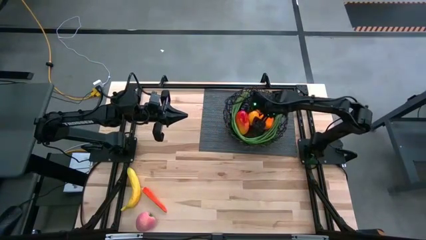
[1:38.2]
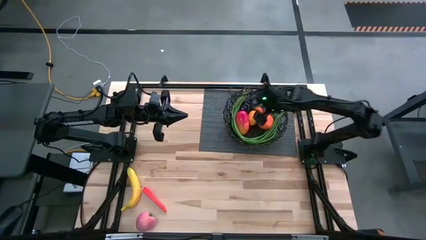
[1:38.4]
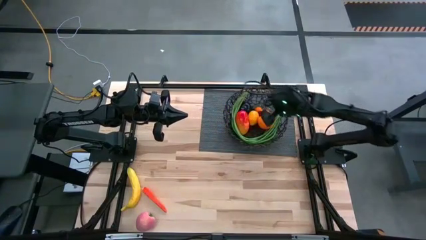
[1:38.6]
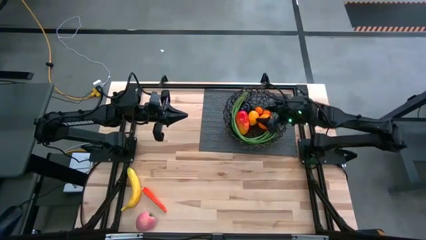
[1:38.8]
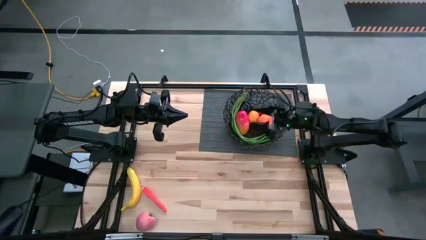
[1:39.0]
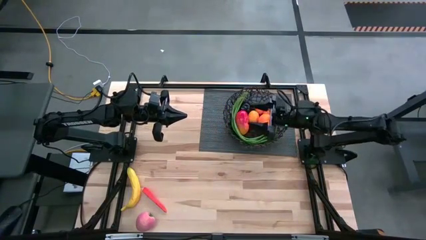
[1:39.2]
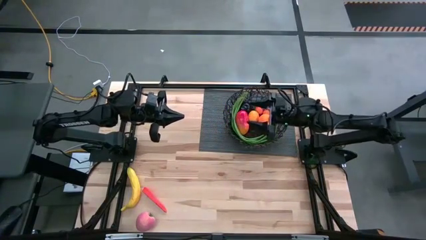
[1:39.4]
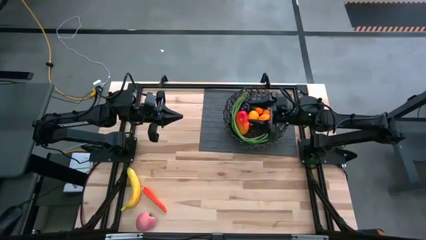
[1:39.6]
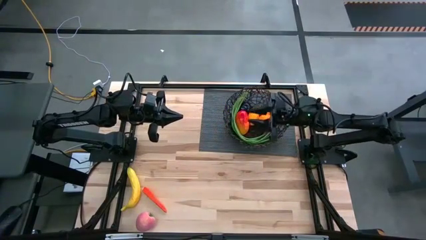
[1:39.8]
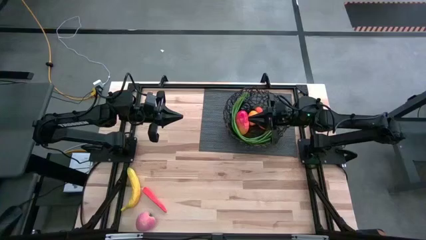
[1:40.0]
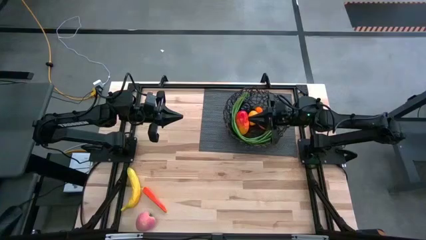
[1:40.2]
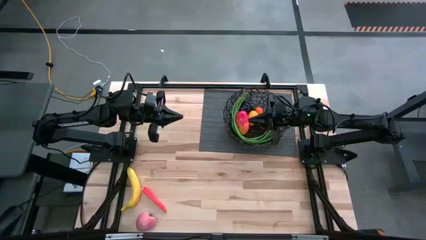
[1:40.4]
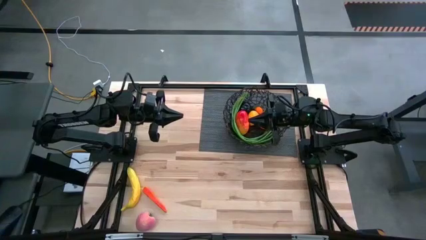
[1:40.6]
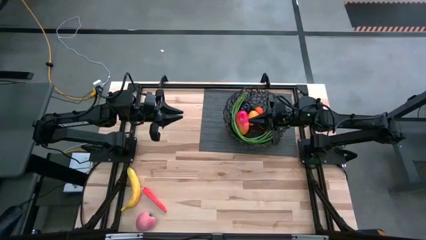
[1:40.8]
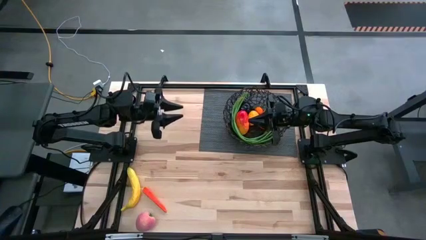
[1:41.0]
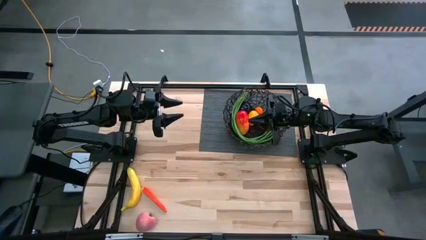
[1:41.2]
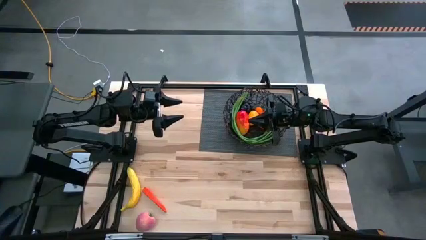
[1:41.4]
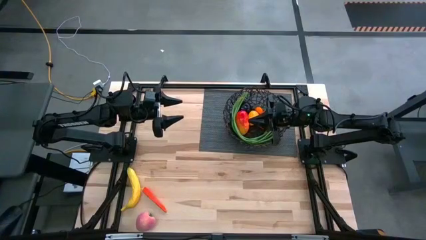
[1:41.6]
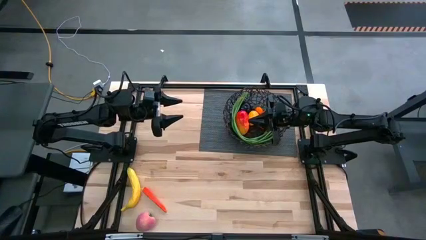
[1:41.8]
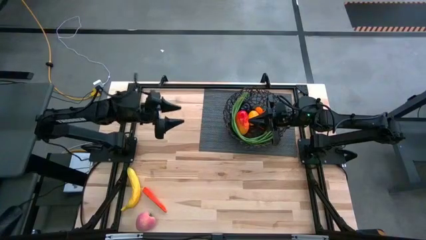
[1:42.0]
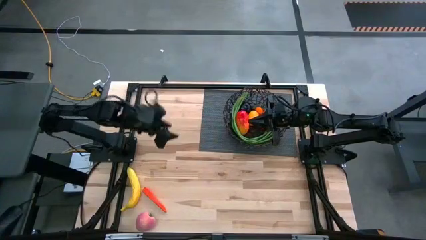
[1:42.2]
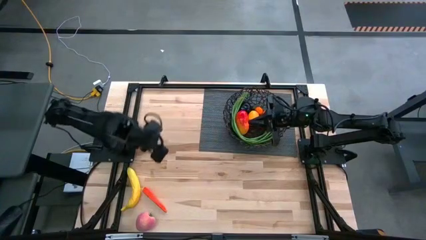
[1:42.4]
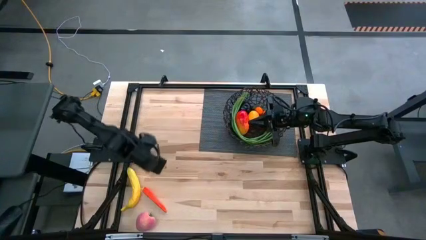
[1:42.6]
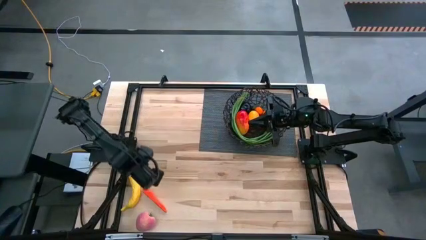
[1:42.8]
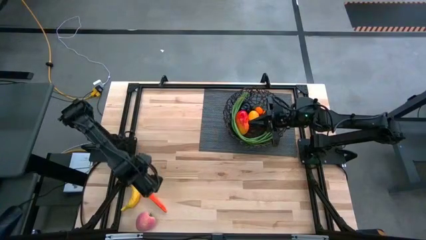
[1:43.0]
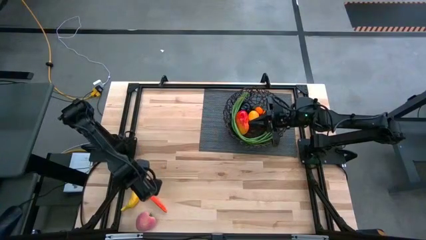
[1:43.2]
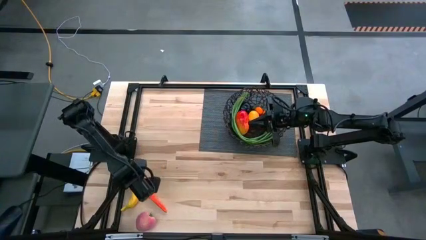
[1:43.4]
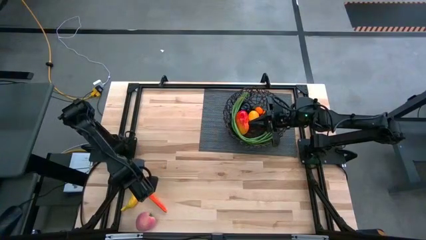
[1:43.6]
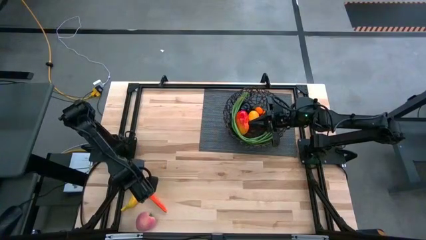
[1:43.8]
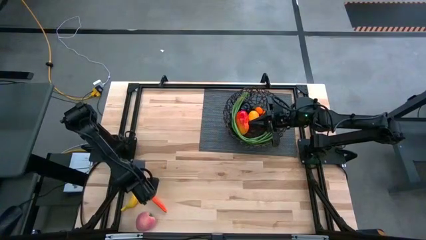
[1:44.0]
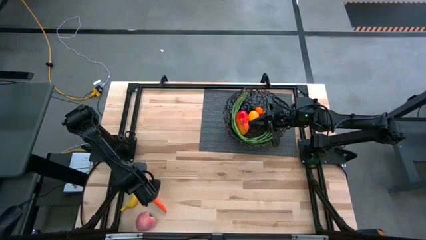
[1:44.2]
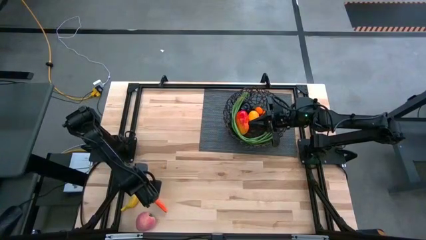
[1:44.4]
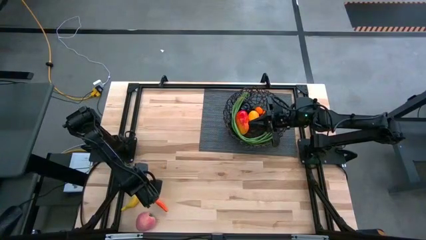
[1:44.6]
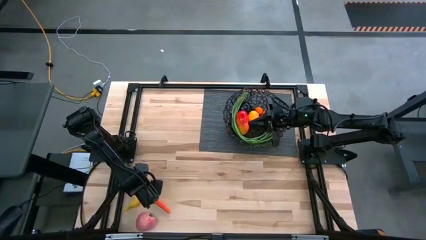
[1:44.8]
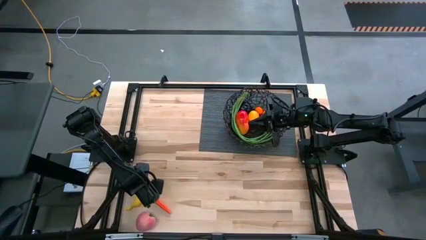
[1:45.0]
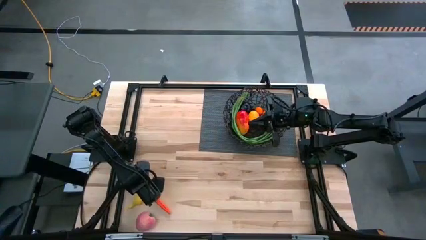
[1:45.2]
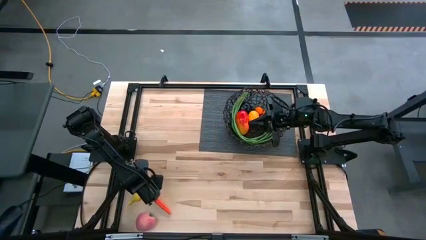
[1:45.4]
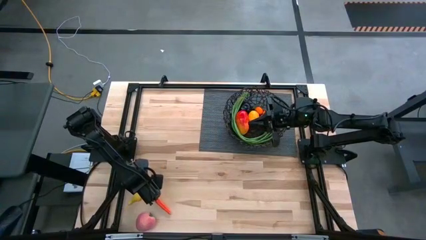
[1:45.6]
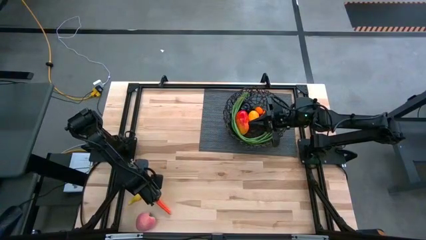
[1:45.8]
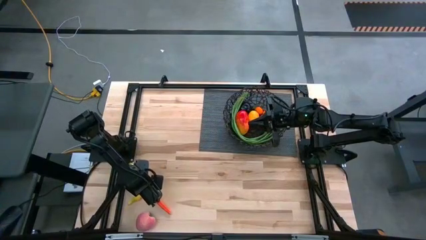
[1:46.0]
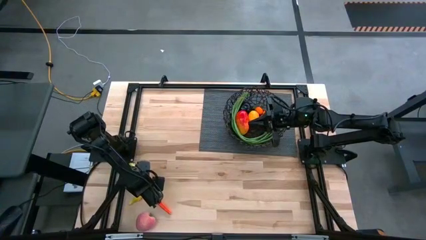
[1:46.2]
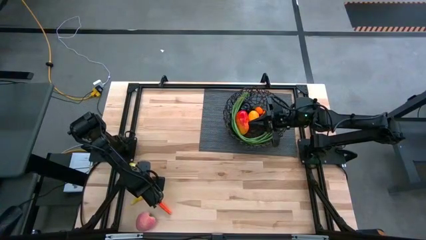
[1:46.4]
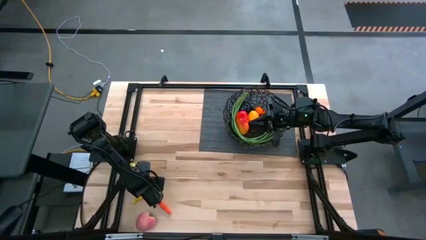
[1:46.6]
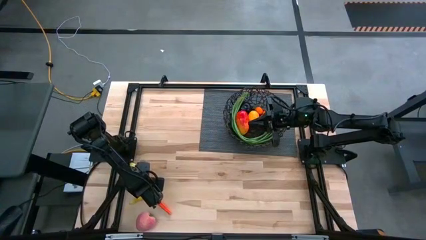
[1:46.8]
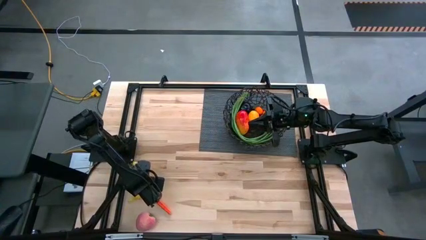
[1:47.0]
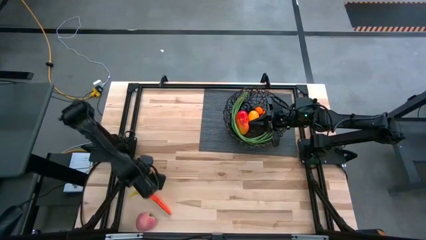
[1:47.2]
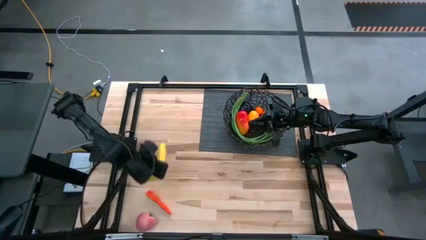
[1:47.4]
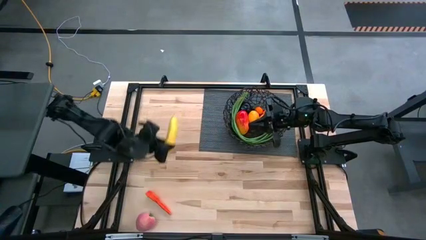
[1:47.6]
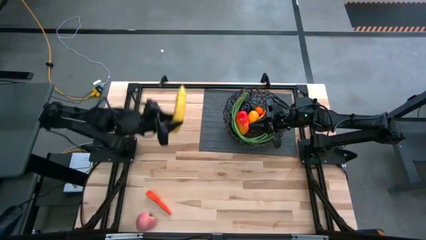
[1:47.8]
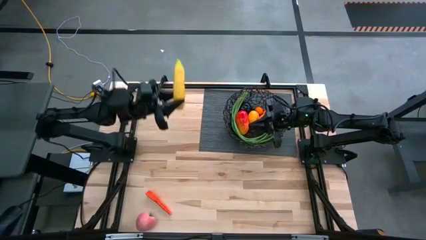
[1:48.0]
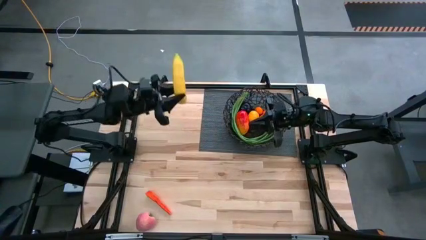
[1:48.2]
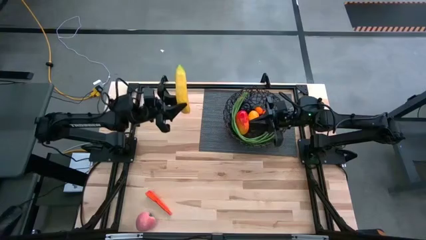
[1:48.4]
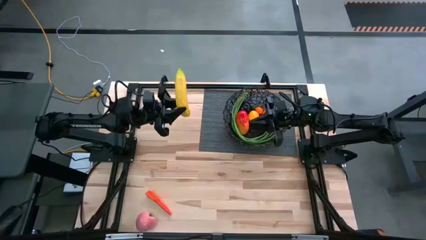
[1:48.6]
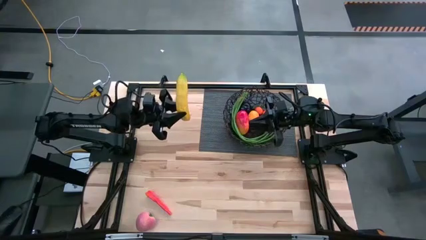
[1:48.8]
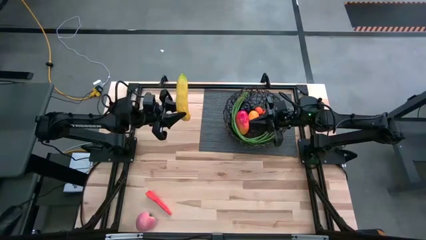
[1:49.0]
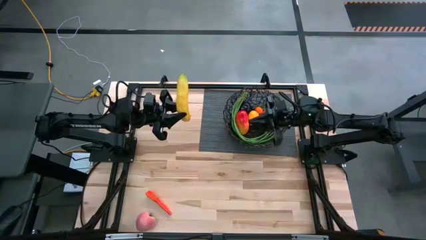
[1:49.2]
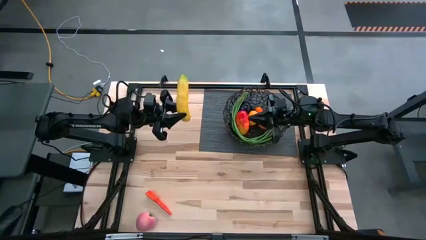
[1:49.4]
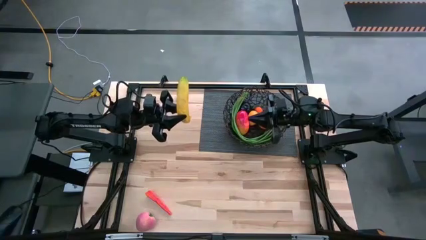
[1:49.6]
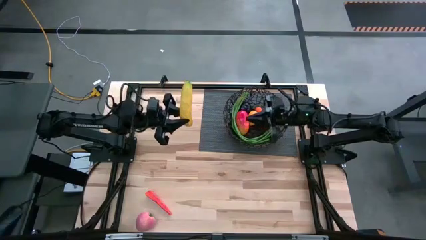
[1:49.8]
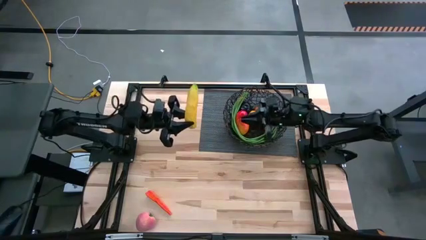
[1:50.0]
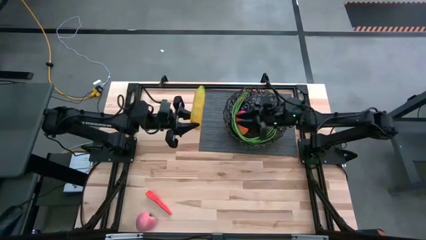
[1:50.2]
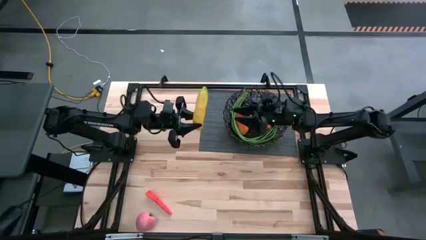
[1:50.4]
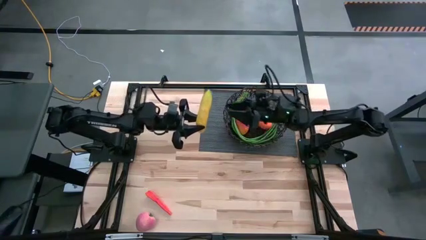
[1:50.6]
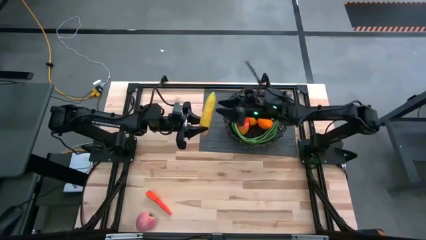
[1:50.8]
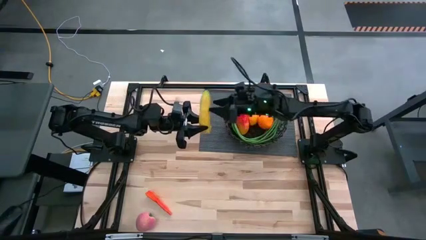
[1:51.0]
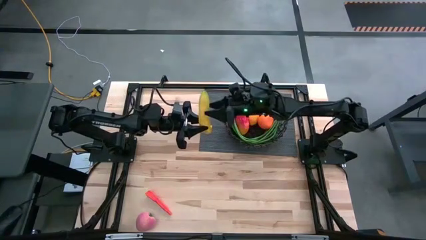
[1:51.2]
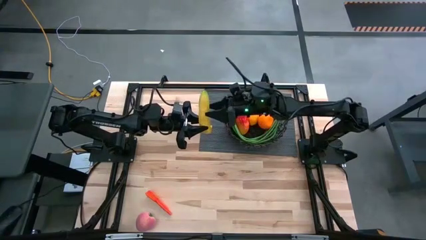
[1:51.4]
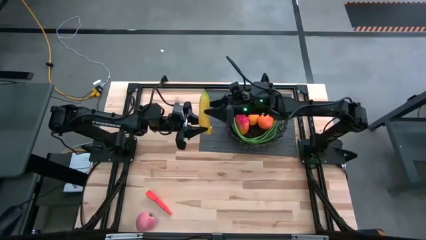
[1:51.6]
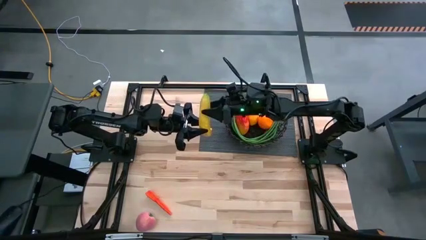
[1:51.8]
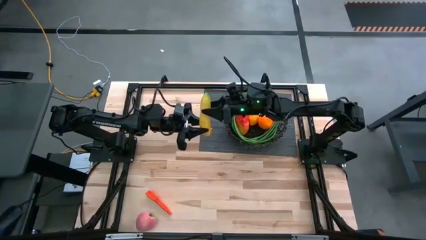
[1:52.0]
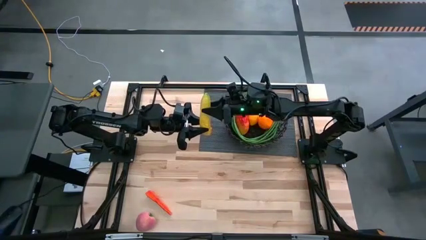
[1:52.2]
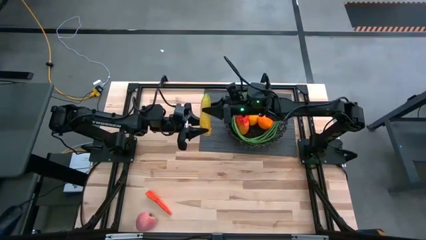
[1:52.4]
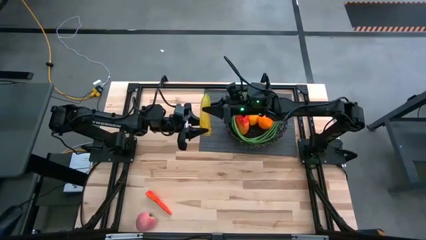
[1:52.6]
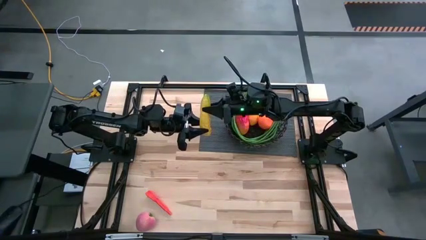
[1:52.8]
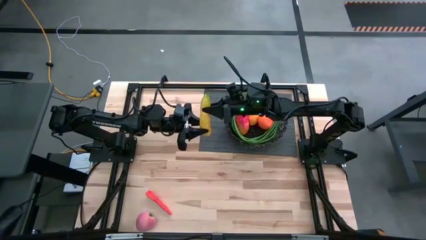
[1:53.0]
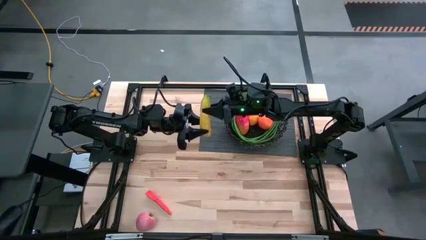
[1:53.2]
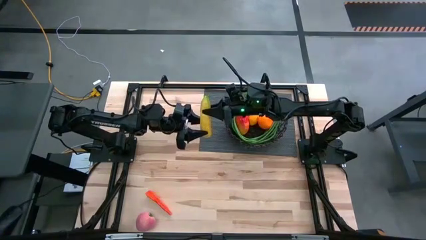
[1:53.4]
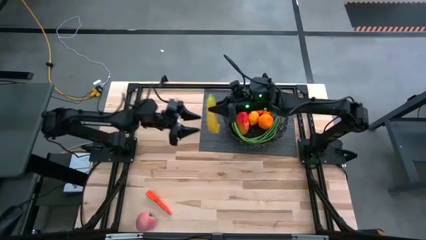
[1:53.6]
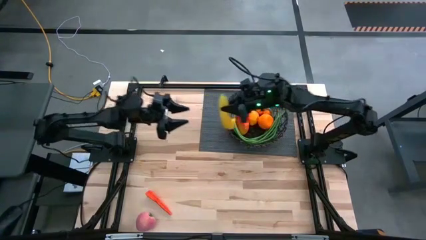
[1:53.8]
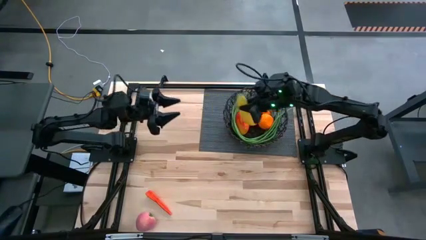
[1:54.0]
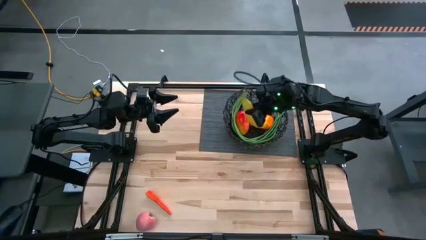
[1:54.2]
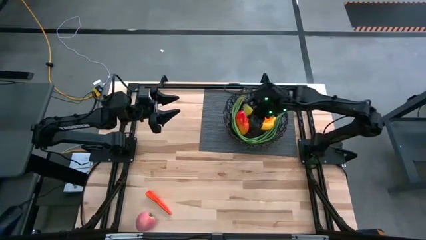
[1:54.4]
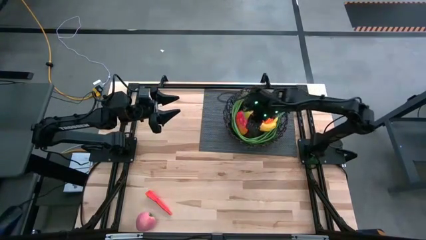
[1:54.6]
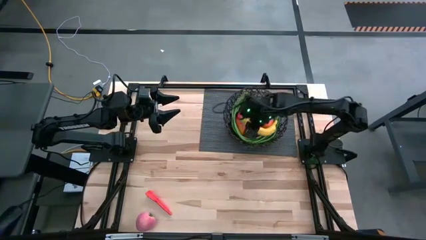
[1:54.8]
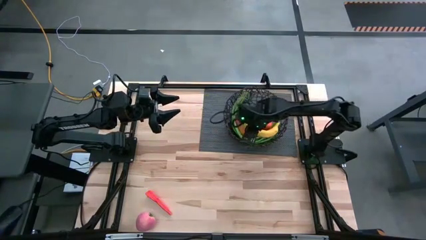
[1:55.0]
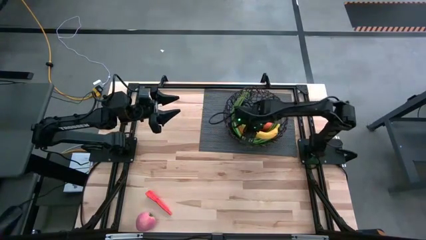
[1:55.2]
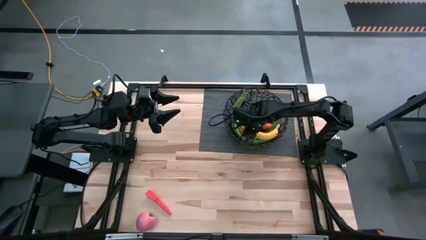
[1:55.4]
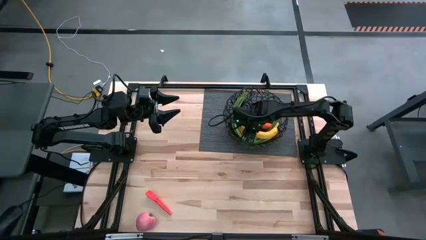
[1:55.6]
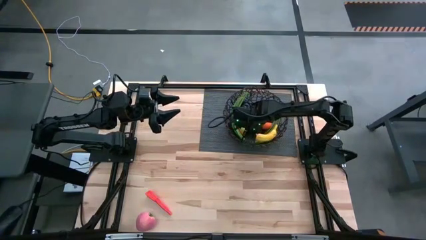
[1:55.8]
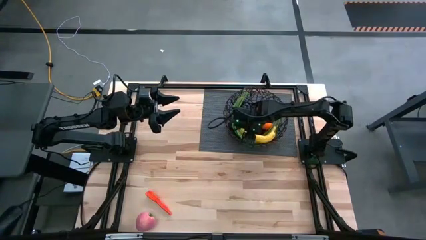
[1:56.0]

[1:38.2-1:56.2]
Task: Build produce basket
Put the banana into the wire basket
